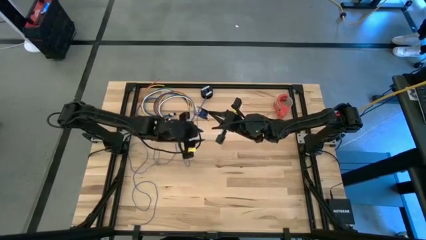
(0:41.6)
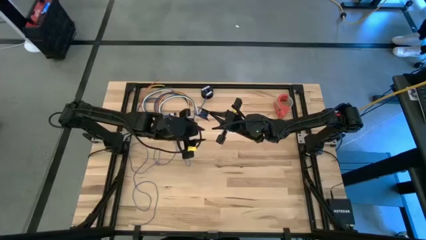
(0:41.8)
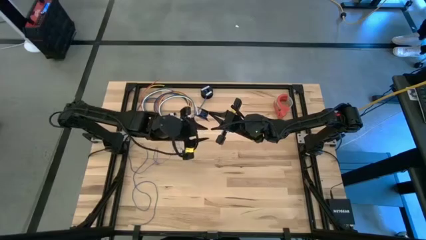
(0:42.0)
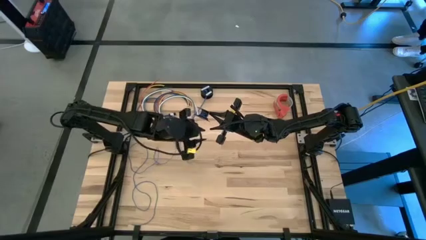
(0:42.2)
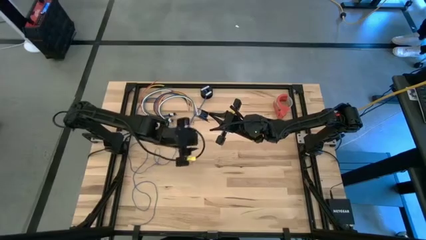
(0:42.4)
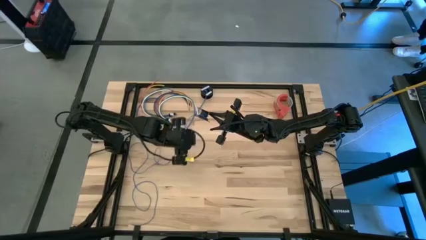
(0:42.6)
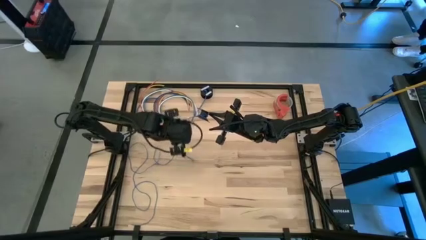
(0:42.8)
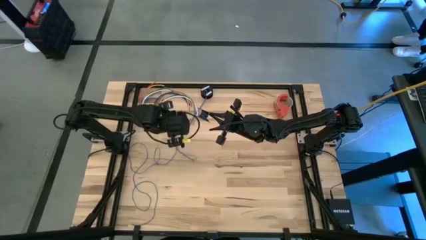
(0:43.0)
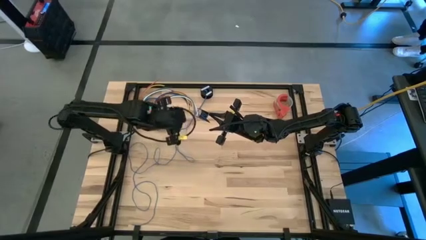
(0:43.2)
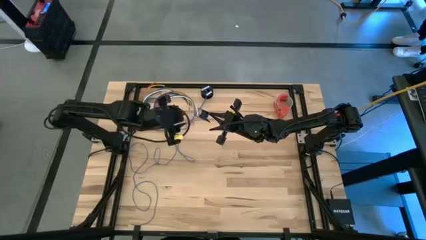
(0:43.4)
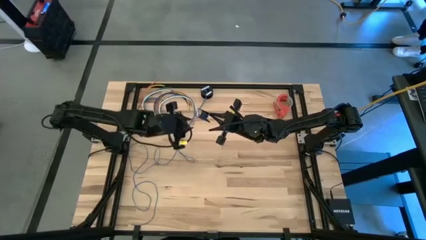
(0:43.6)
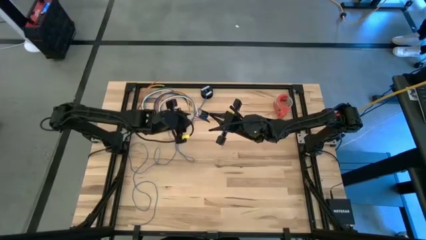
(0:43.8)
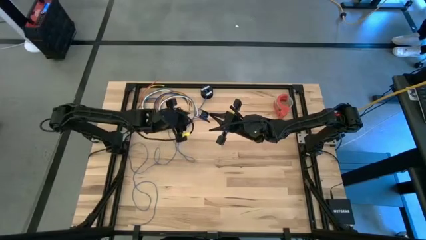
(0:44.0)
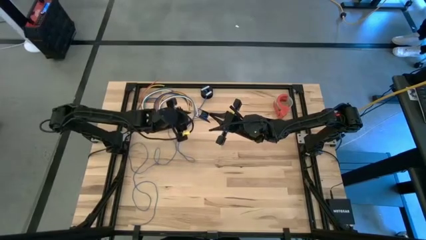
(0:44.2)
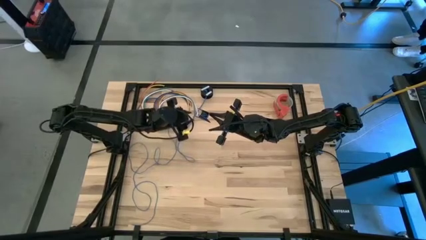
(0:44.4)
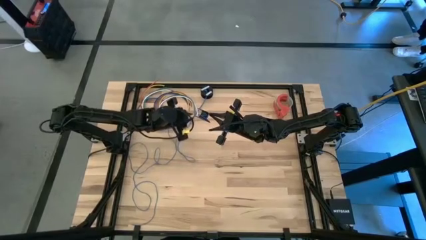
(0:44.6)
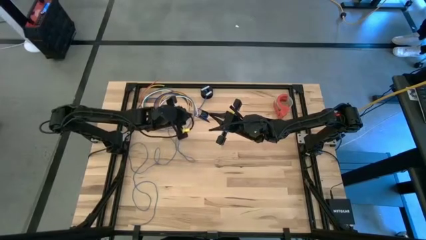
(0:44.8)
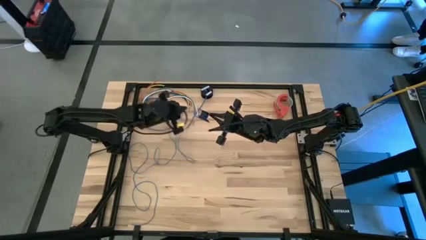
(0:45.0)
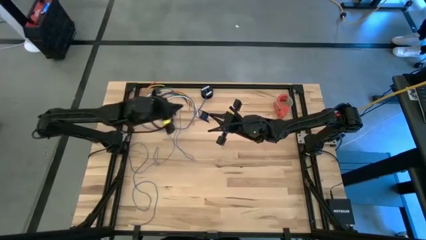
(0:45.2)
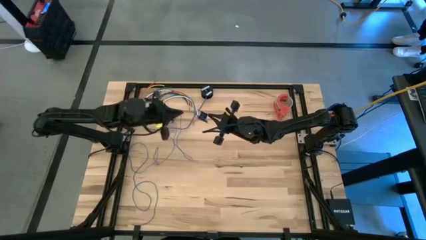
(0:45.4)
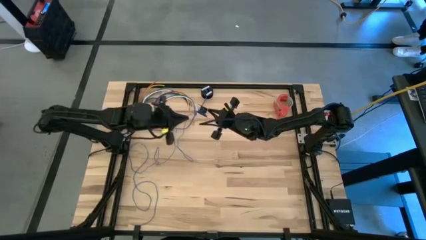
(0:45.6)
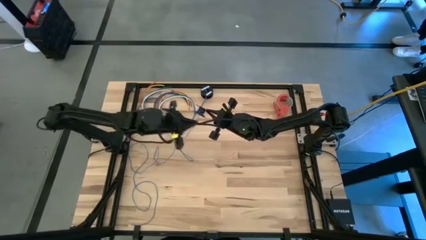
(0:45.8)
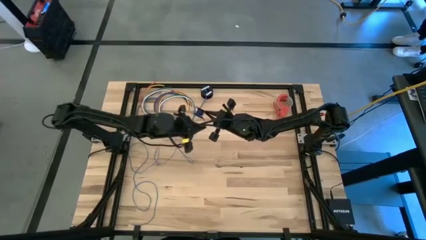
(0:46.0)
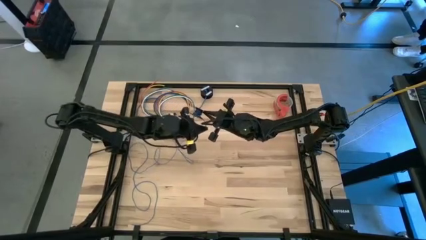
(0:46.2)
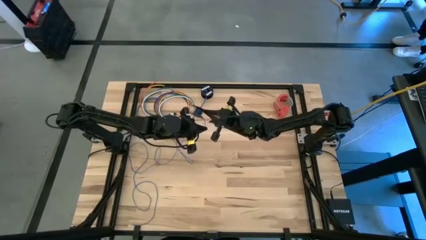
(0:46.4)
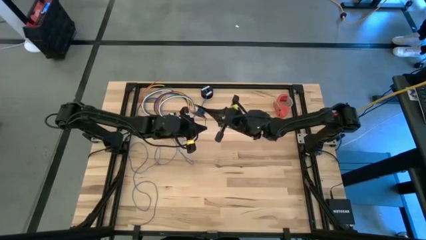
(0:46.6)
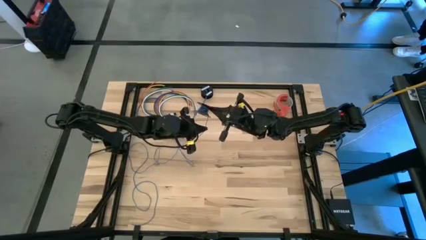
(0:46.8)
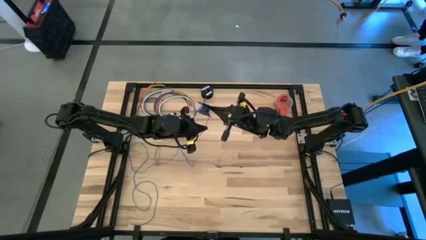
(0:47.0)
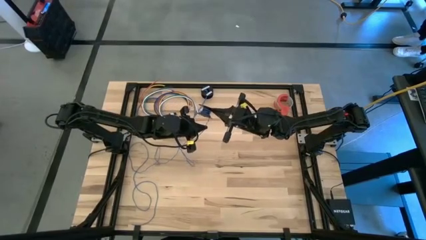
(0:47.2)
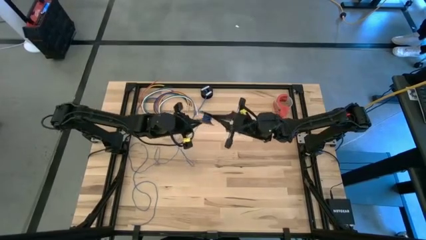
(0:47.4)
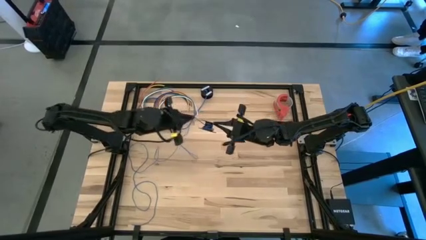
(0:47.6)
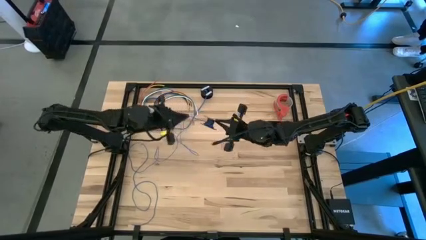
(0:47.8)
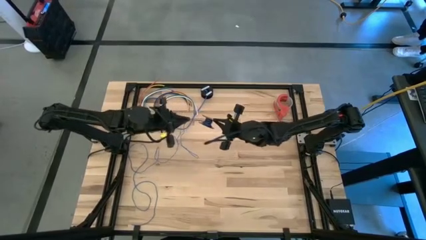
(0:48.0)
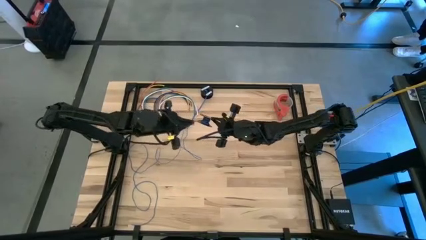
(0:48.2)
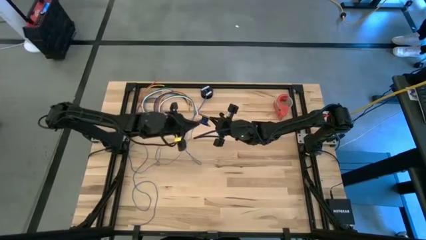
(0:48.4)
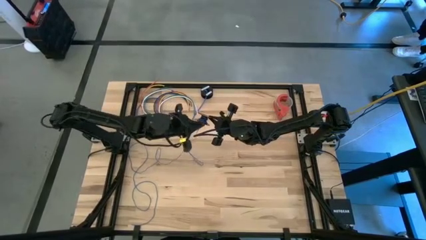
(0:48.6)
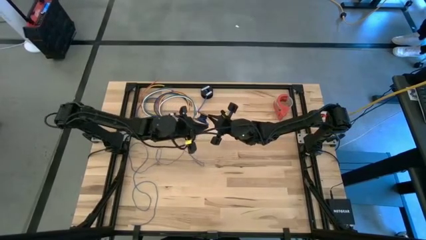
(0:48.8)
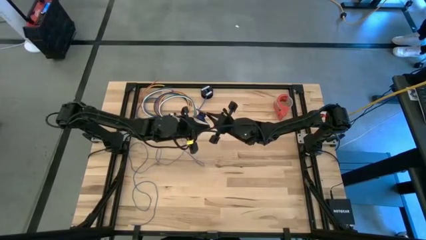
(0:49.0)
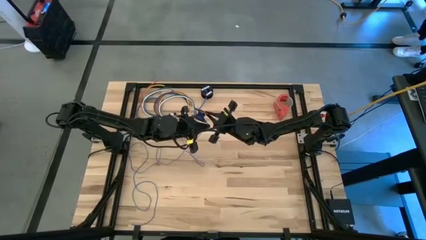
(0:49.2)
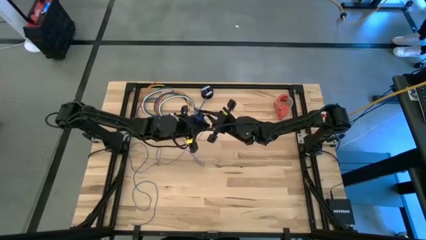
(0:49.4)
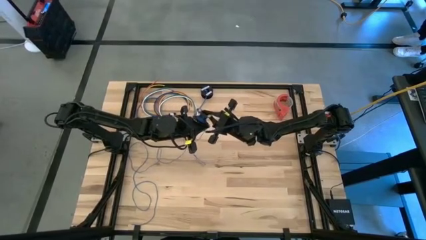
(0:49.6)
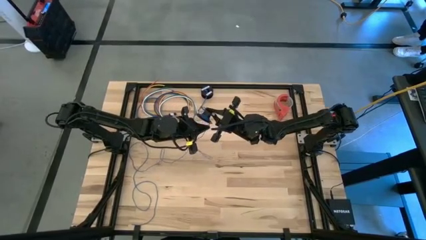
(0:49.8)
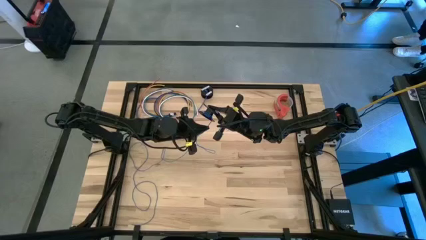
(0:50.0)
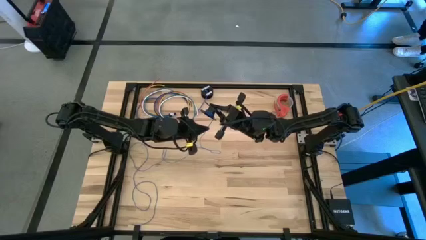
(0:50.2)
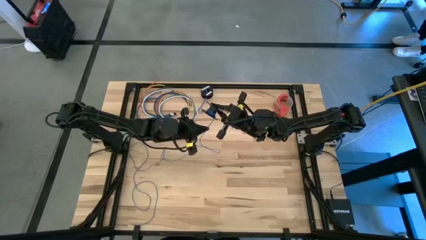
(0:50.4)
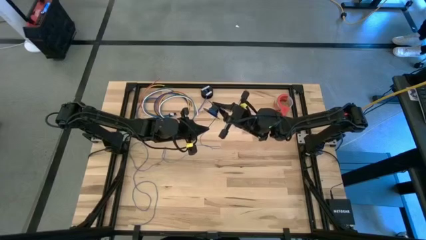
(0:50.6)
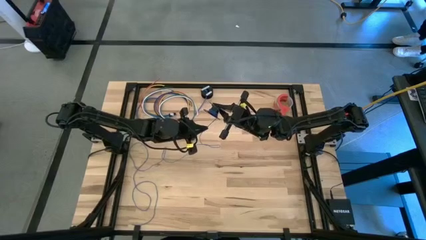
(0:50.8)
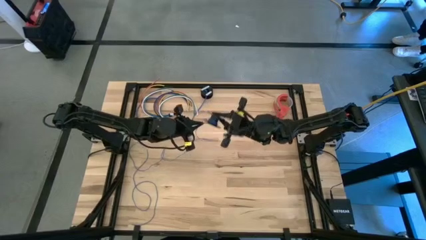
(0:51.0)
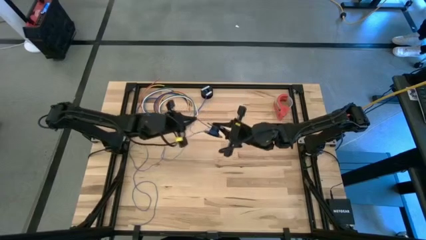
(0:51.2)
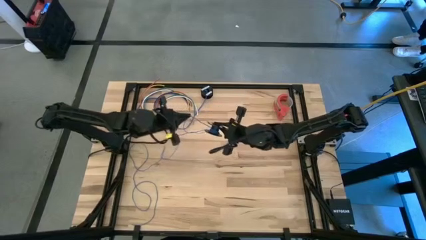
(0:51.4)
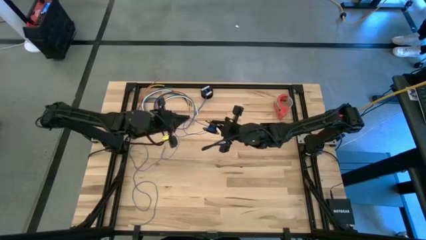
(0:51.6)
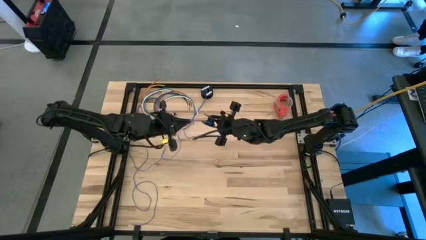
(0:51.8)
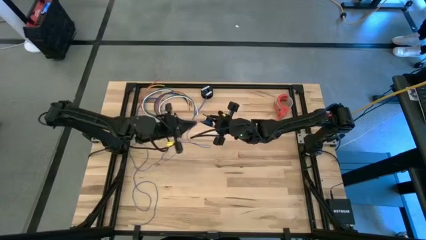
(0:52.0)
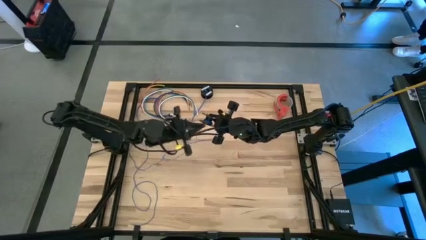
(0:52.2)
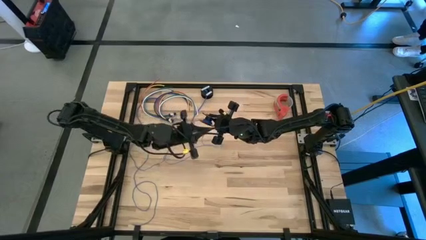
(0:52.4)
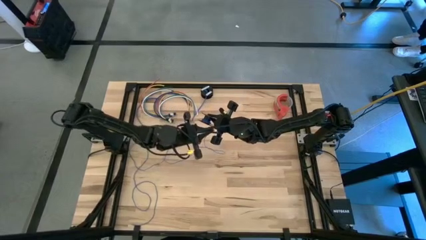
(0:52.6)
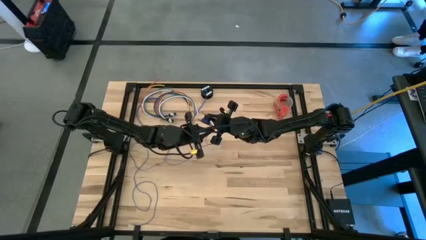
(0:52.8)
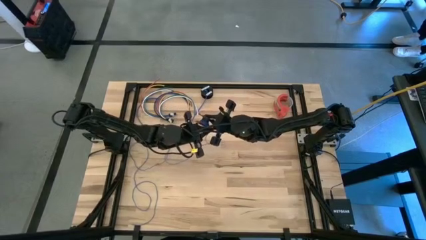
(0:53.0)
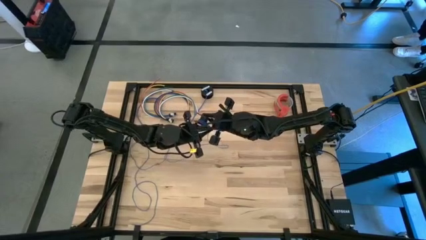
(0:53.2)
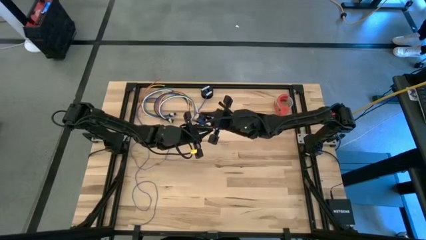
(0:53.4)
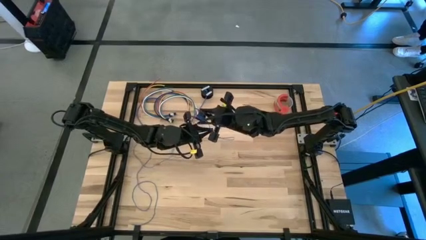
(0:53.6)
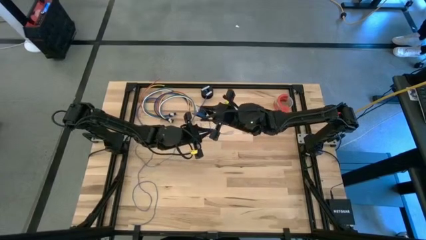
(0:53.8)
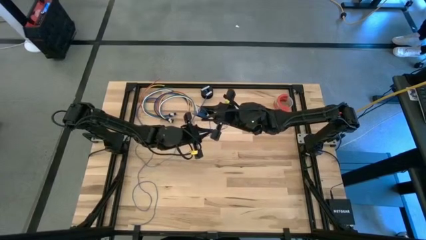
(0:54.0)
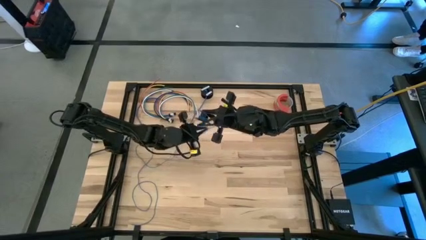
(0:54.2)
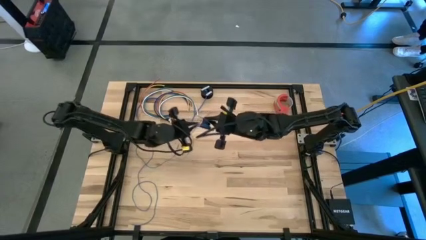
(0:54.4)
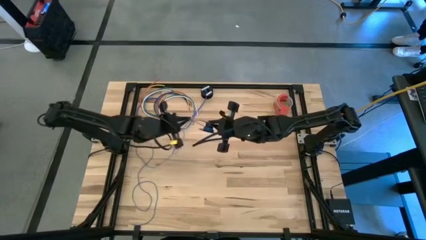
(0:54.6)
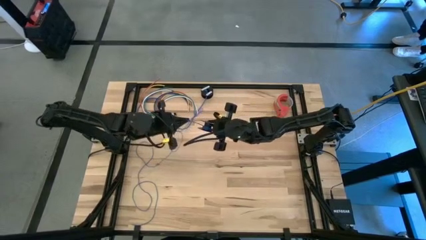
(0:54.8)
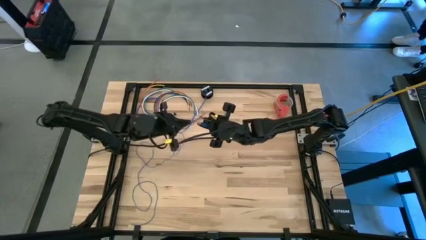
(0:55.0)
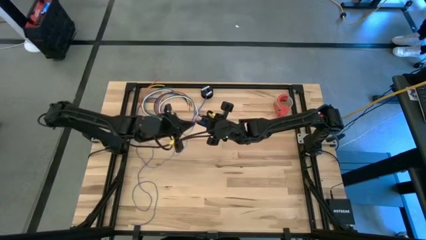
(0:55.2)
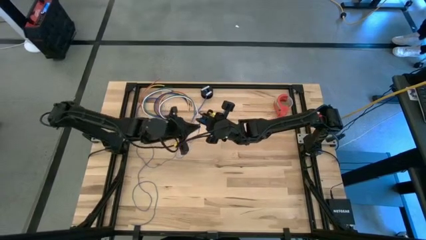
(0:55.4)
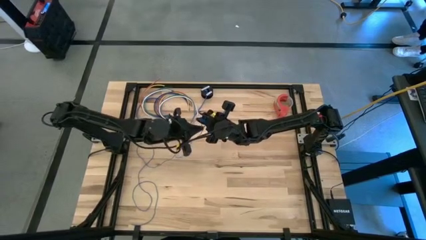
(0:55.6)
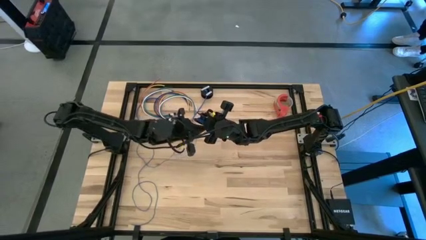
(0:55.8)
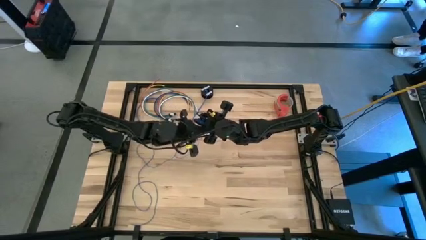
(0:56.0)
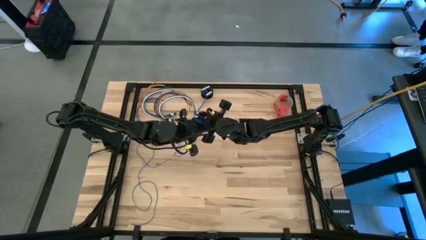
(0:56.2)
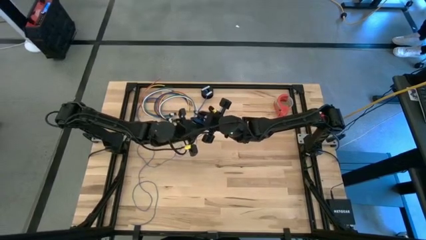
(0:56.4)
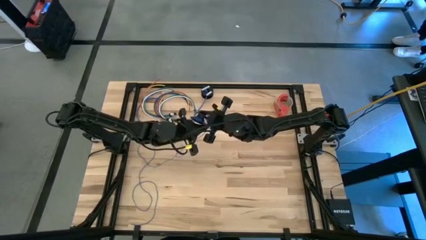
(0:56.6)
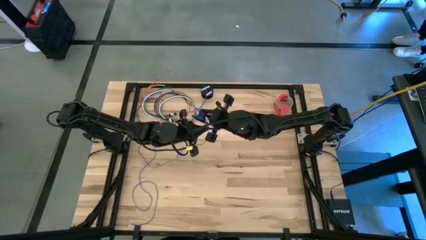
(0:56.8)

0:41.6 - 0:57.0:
Task: Coil cords
Coil the blue wire onto the spool

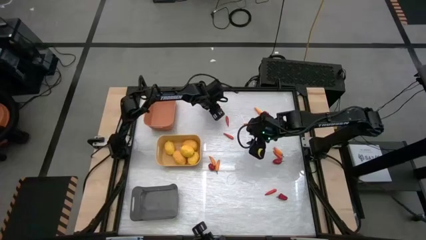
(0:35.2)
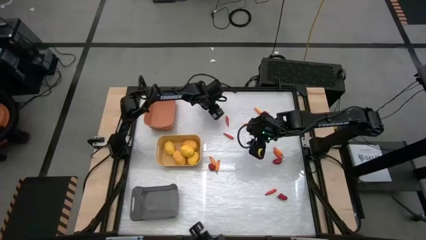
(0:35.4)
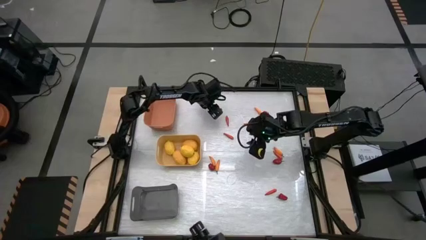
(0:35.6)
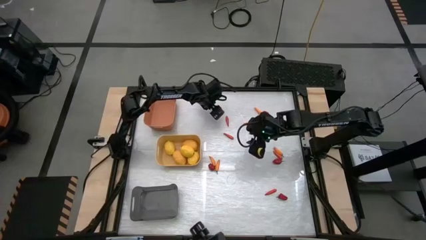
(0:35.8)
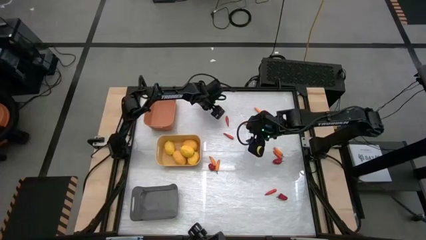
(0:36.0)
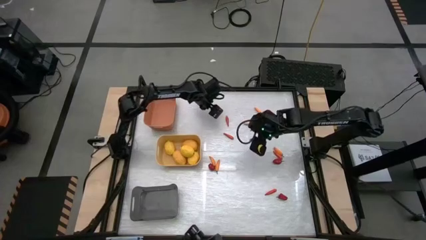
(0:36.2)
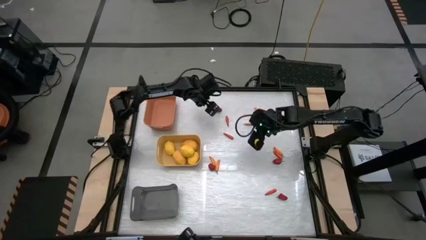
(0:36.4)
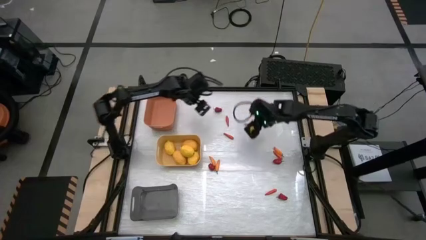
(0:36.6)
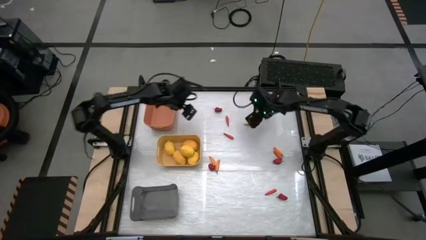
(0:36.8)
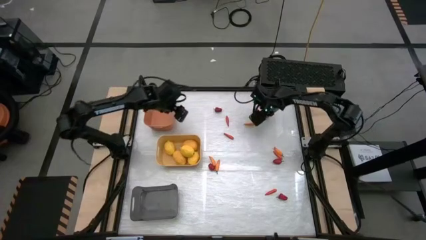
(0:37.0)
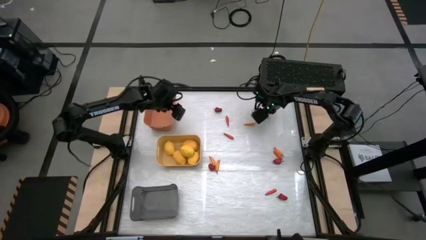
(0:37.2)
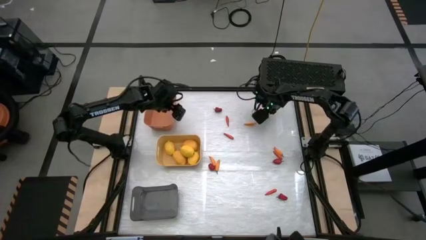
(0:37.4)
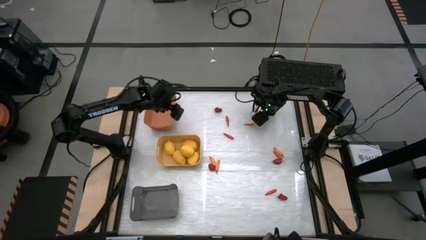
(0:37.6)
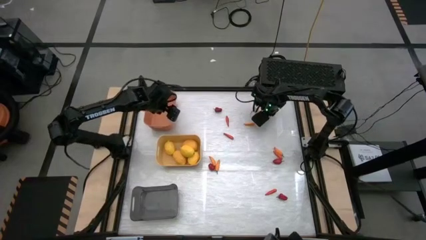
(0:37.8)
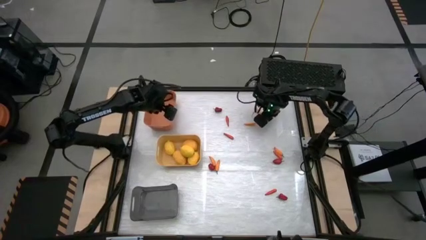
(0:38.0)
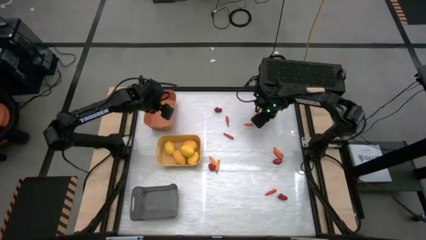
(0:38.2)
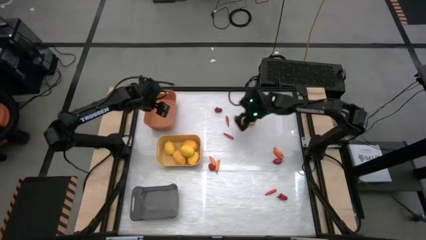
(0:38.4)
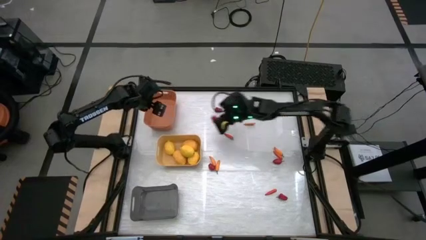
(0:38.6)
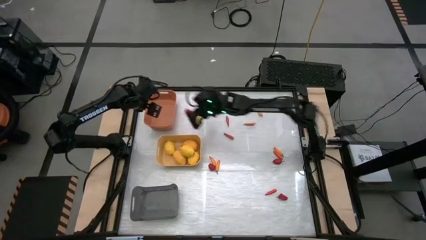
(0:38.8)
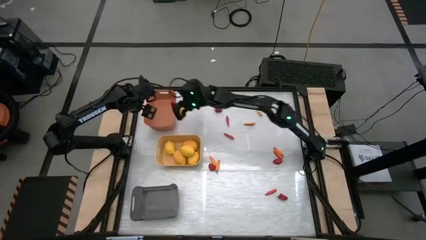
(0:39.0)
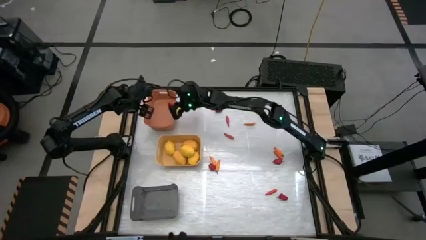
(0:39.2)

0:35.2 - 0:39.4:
Task: Sort produce into baskets
Put the red chili pepper into the orange bin
